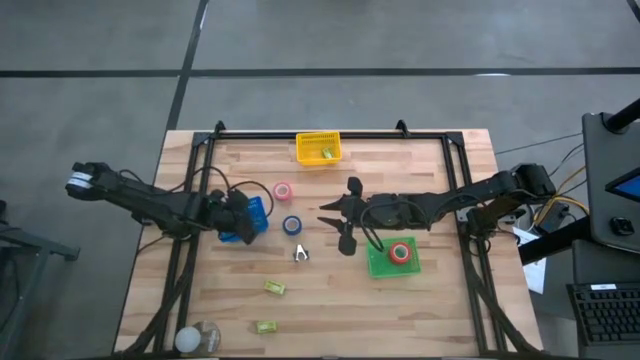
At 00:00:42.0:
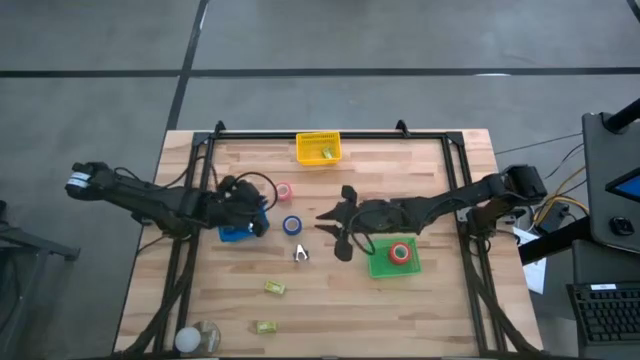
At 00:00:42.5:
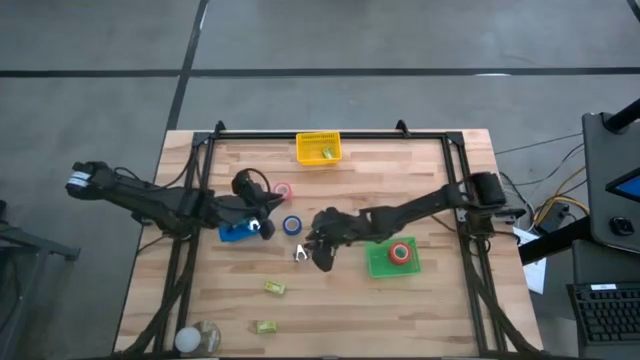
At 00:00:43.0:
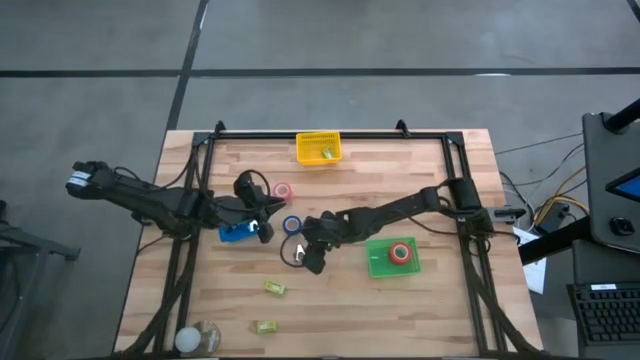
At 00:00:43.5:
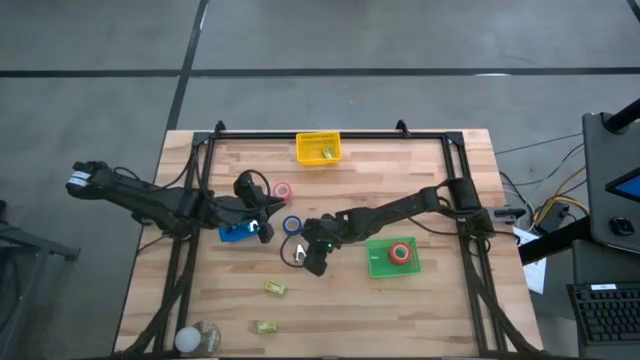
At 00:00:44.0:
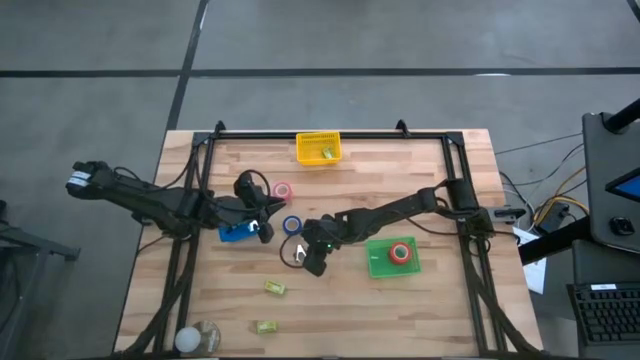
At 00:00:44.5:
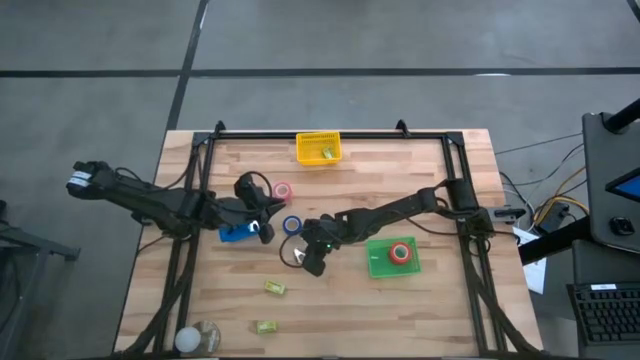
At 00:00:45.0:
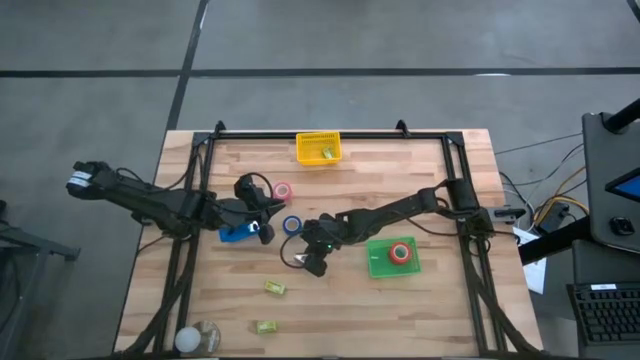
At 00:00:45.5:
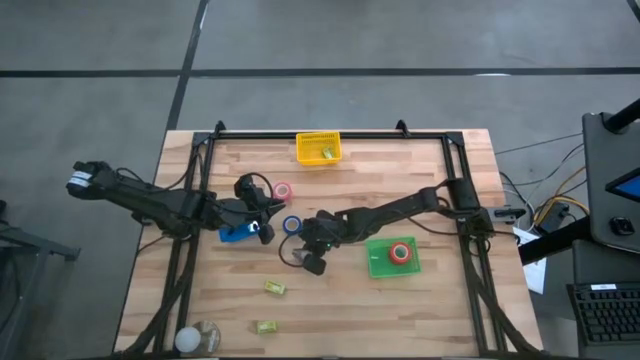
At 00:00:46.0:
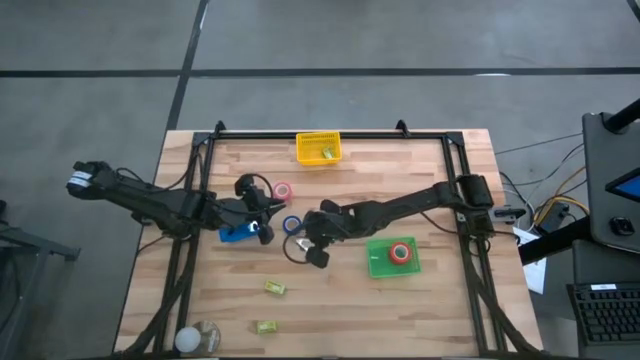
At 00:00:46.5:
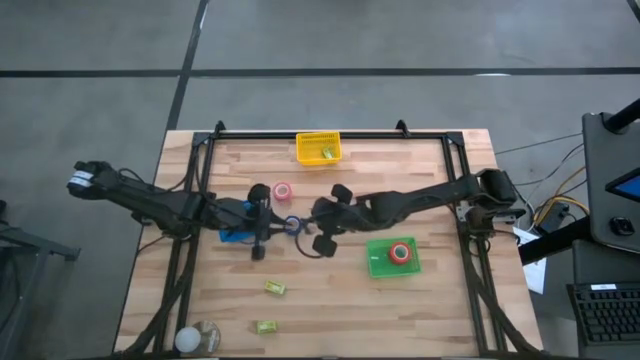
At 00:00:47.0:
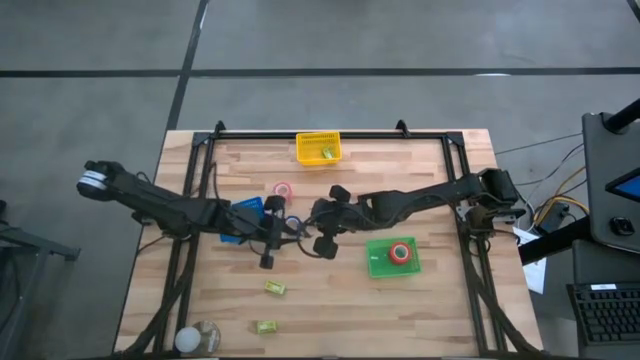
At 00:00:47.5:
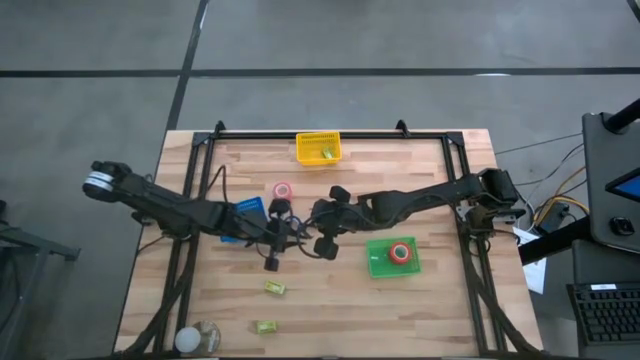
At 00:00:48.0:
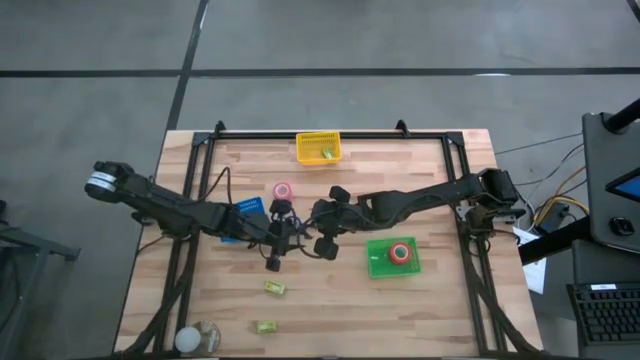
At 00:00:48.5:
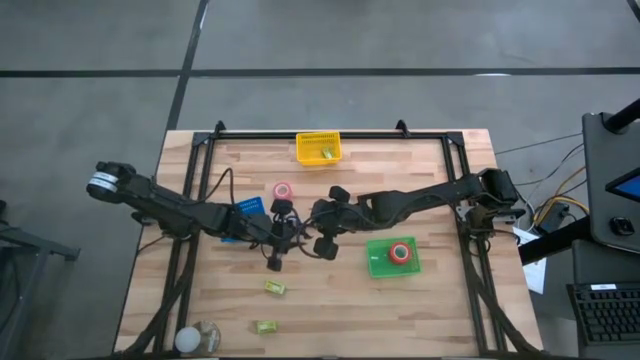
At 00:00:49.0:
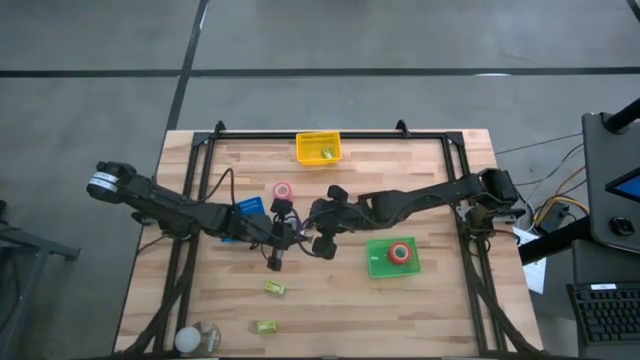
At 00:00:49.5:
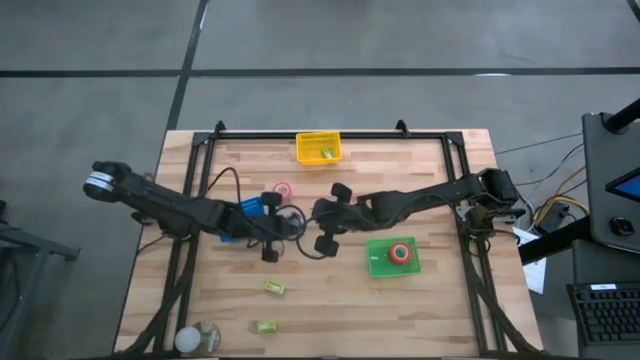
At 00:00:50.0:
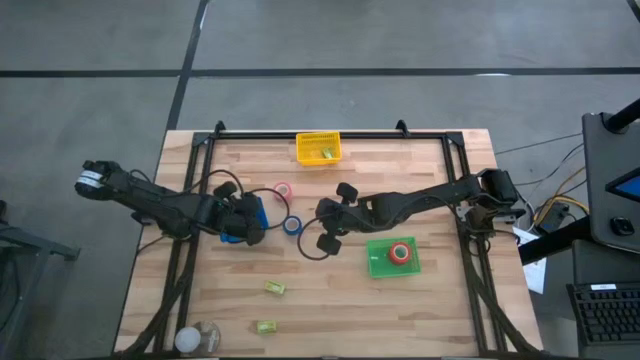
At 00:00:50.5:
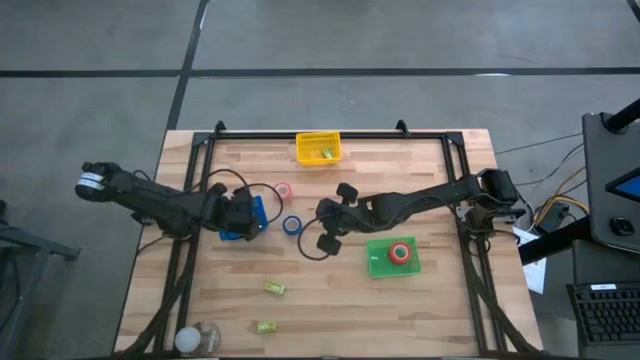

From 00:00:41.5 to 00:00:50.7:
Task: Pick and place Stapler, Stapler remover, tape
Put the black staple remover into the blue bin

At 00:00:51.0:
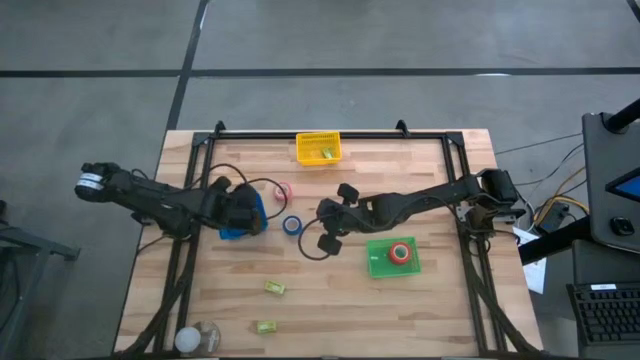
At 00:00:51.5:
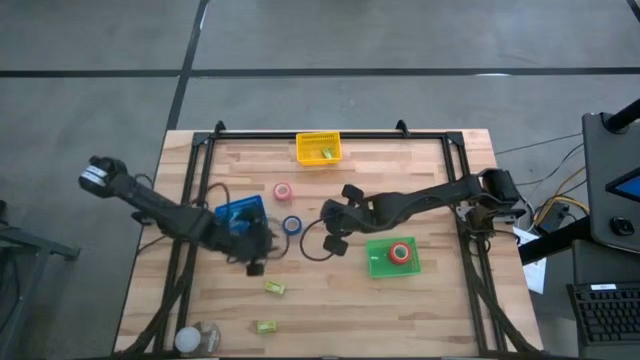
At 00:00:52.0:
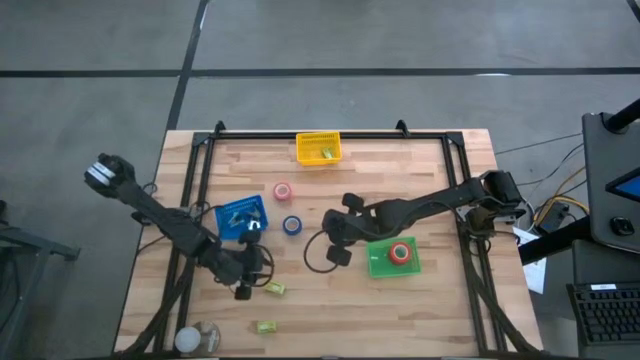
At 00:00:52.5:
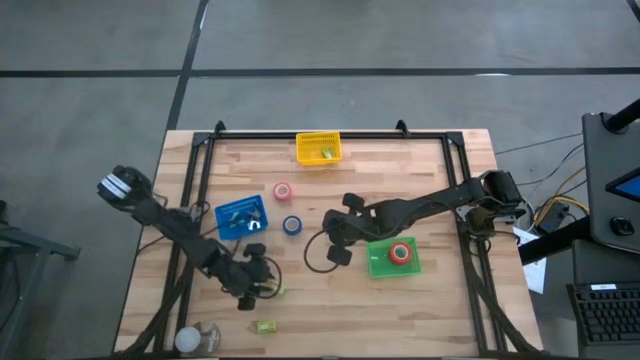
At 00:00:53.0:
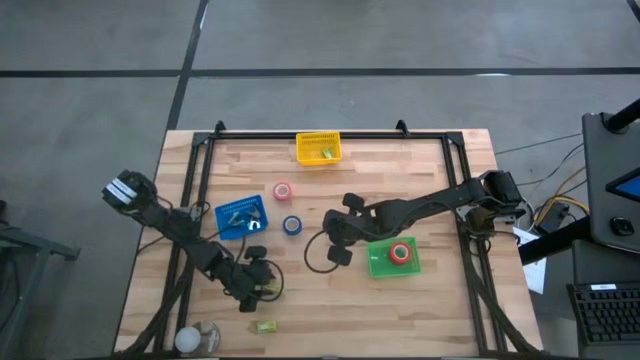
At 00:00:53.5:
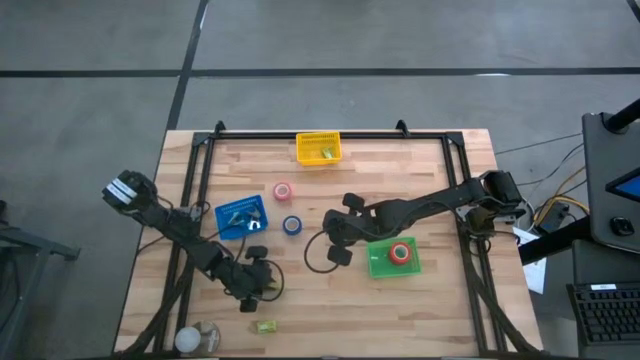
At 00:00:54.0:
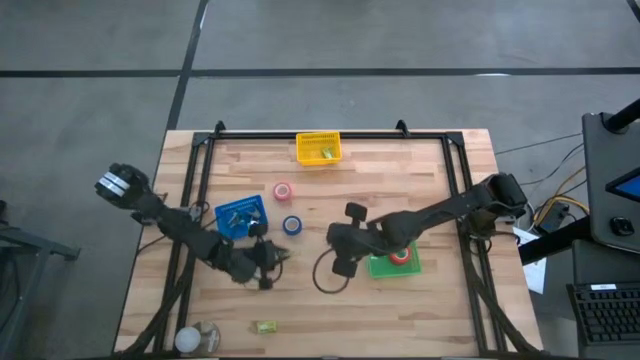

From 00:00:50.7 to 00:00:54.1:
Put the top green staple into the yellow bin

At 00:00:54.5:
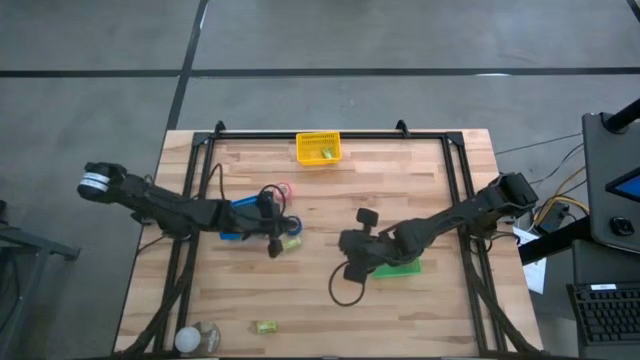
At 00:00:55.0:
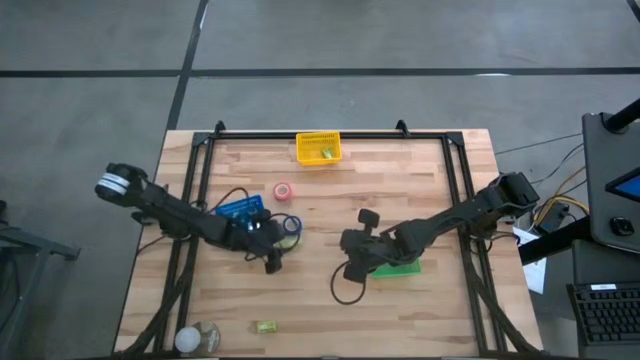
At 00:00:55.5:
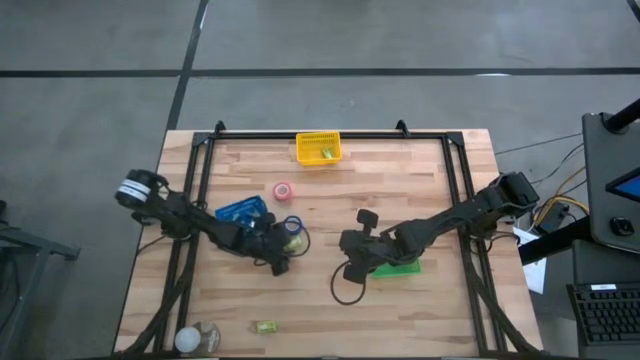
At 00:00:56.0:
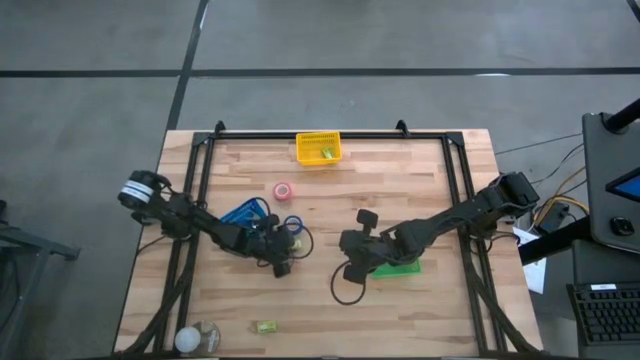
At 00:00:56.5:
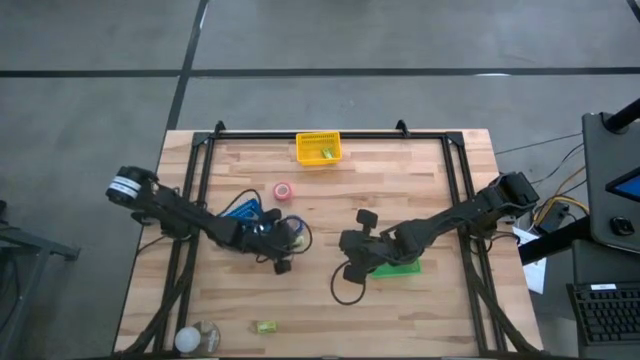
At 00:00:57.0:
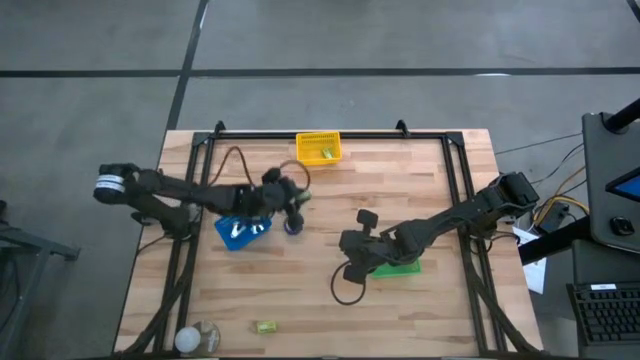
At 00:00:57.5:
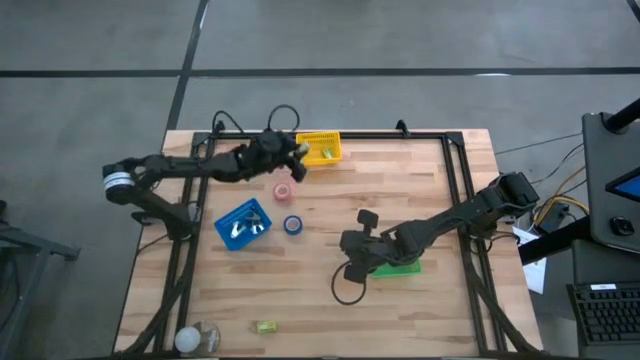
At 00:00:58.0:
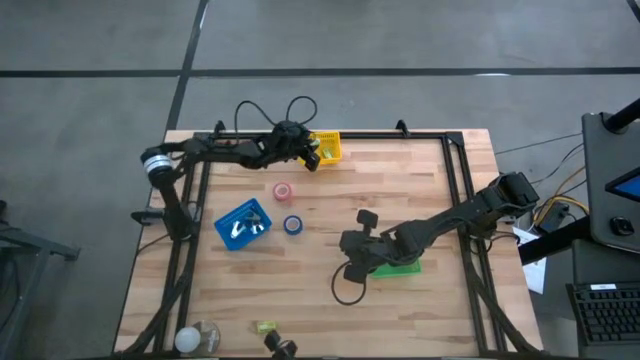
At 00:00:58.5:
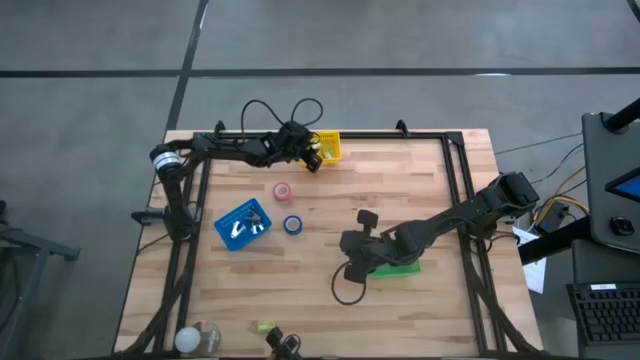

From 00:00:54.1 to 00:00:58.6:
Put the top green staple into the yellow bin

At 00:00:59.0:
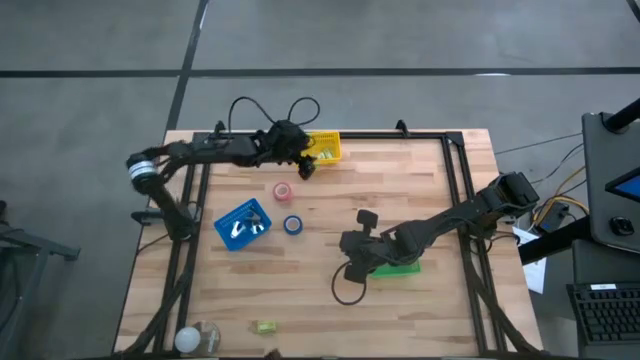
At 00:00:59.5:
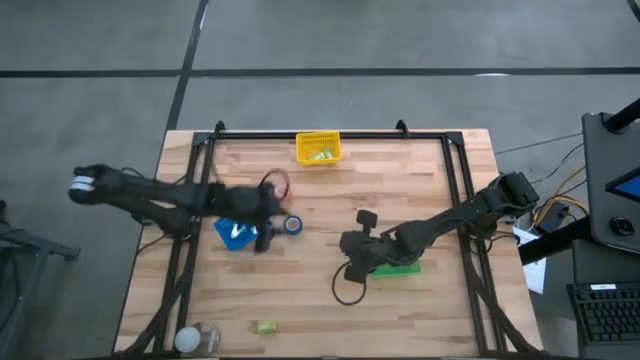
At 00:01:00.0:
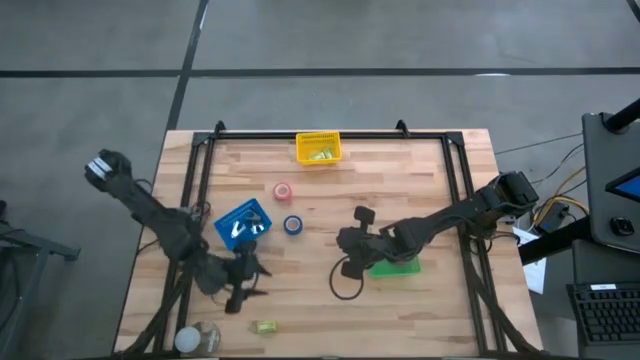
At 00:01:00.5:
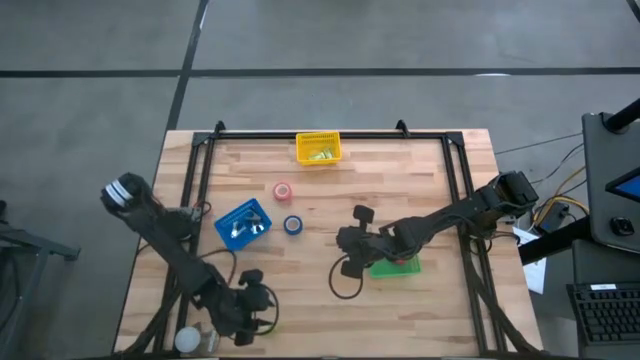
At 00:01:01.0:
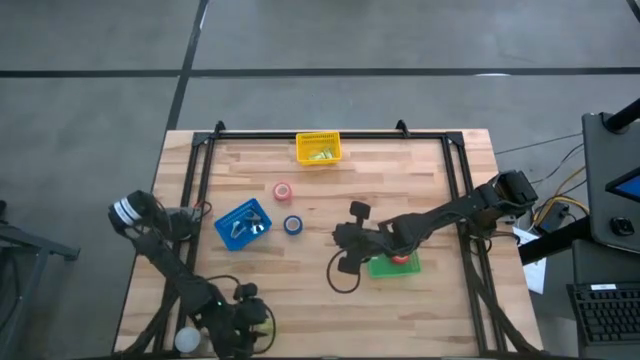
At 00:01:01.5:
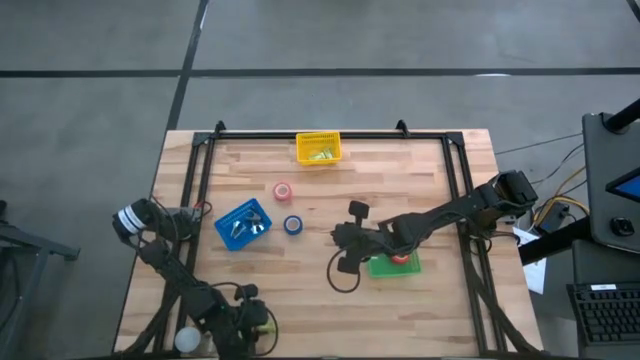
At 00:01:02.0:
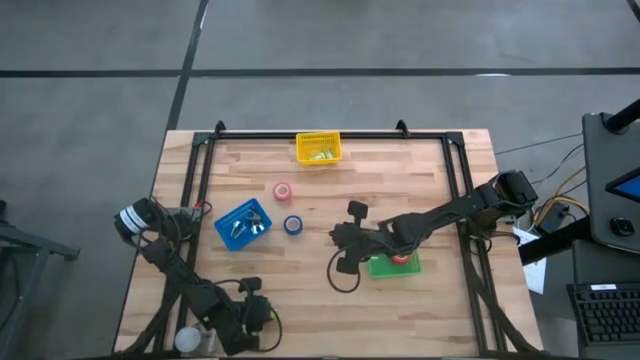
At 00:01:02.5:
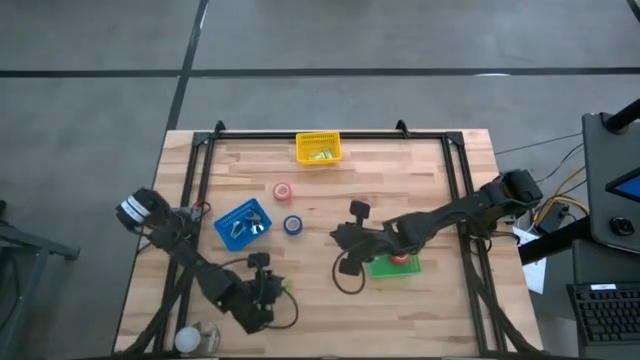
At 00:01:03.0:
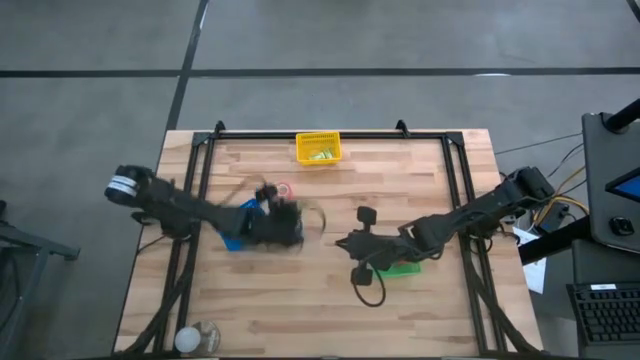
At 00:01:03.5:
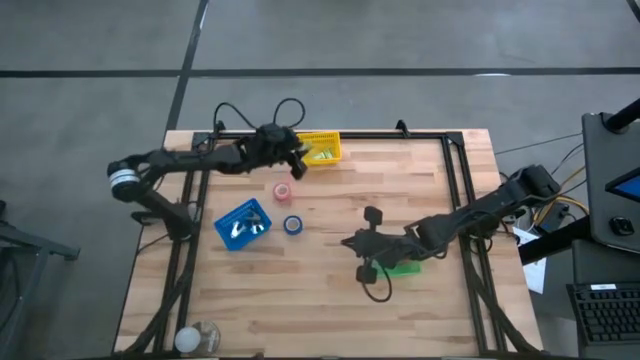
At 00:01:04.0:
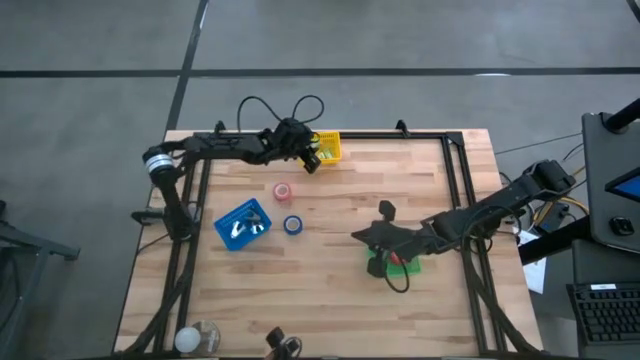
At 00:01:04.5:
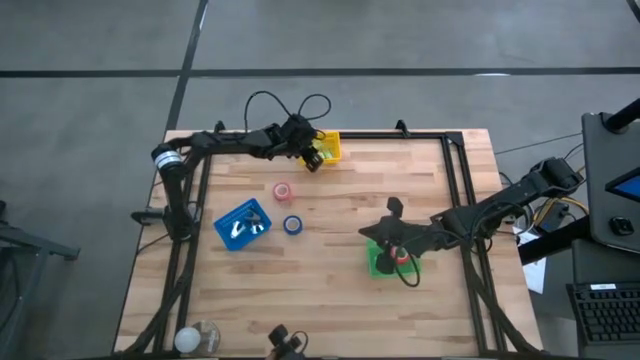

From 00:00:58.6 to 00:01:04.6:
Put the green staple into the yellow bin
